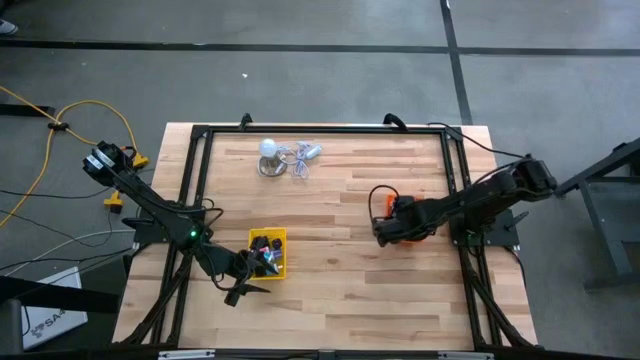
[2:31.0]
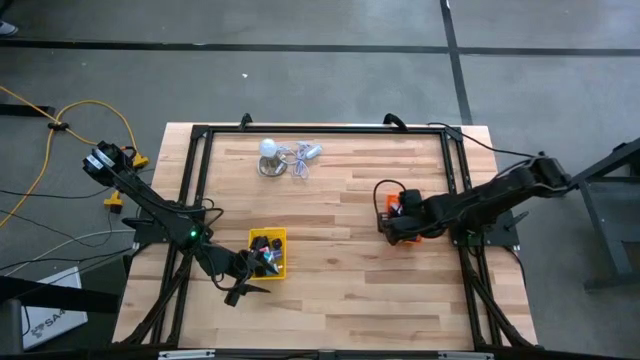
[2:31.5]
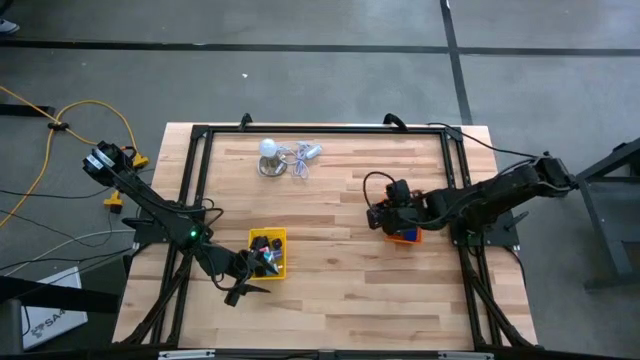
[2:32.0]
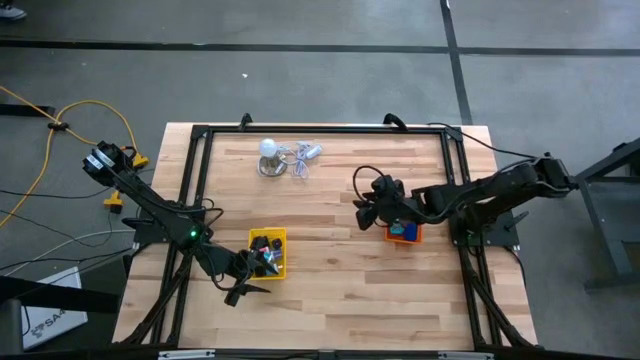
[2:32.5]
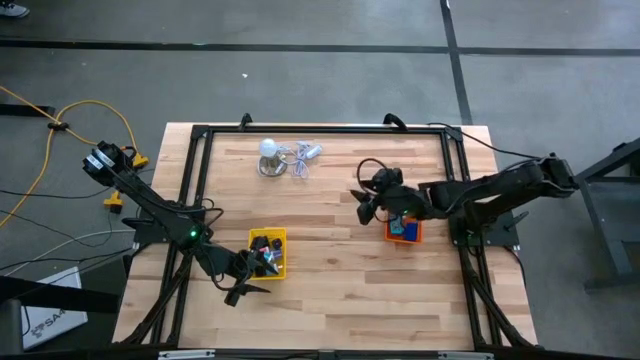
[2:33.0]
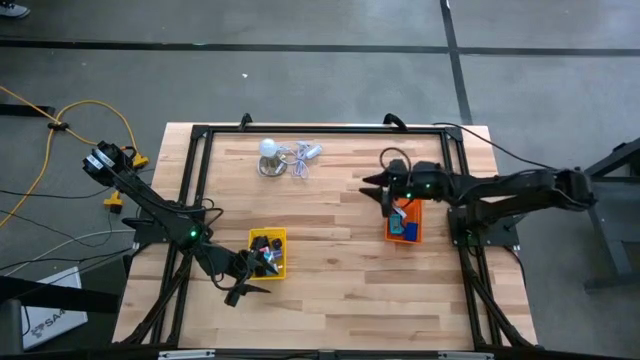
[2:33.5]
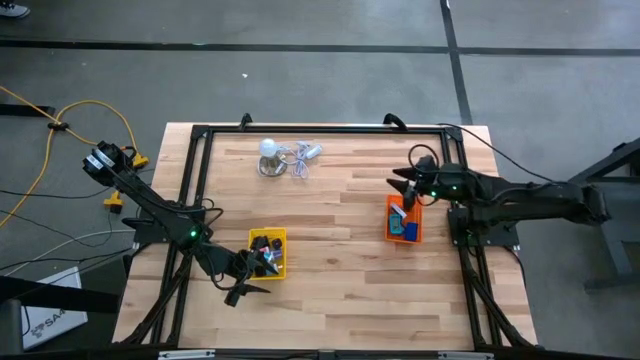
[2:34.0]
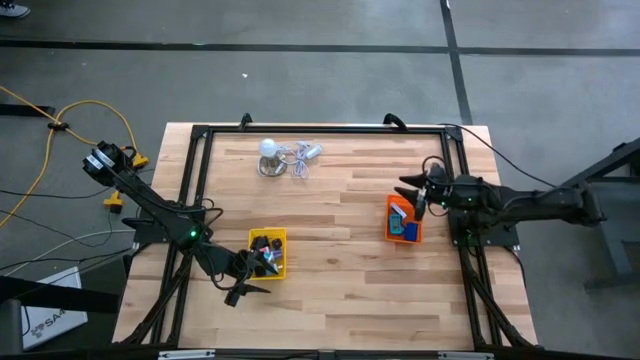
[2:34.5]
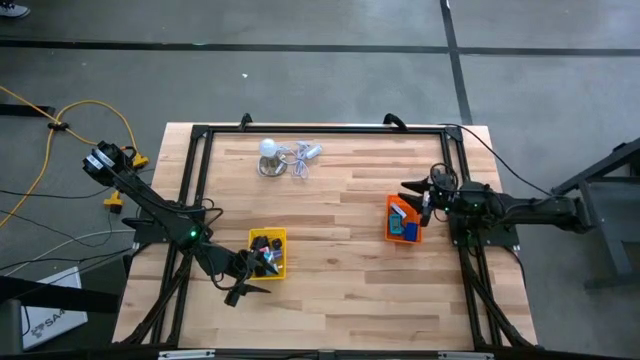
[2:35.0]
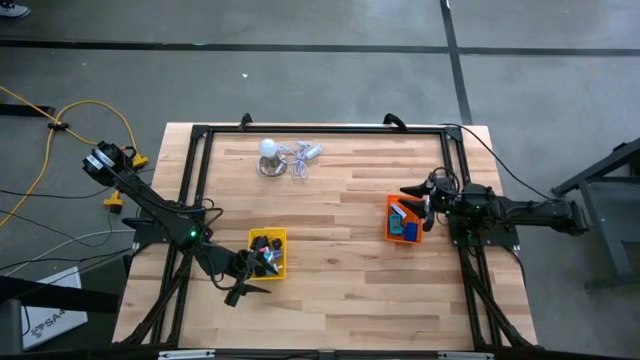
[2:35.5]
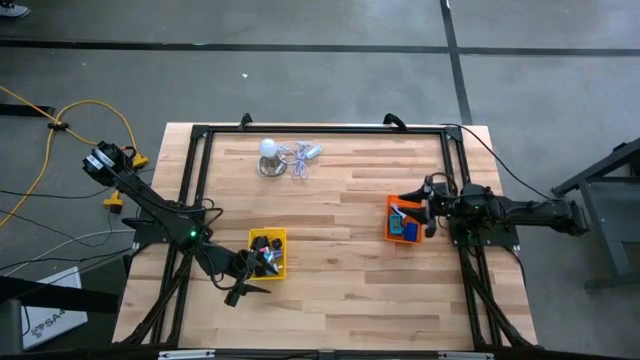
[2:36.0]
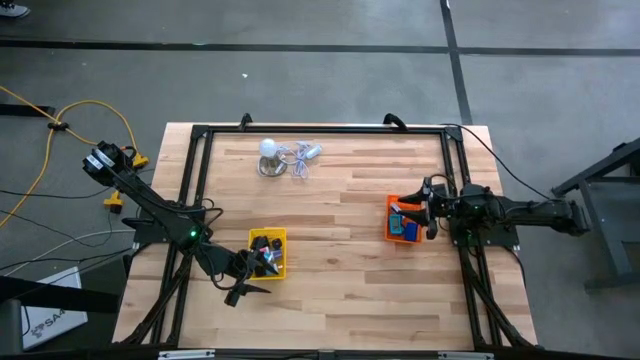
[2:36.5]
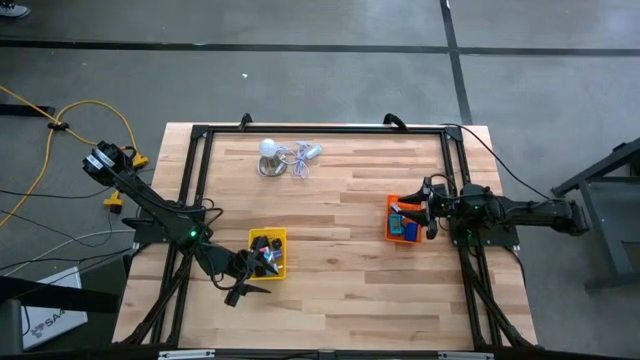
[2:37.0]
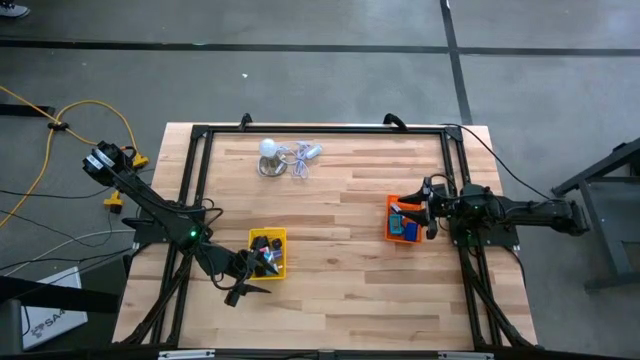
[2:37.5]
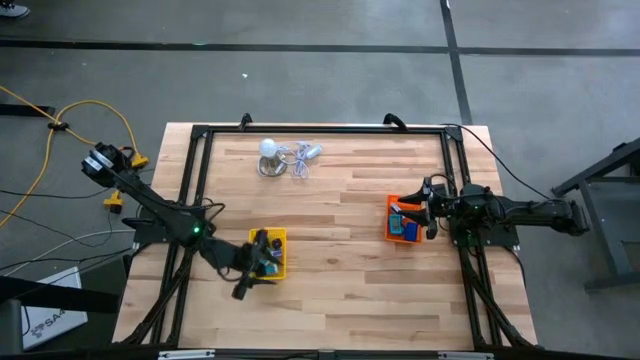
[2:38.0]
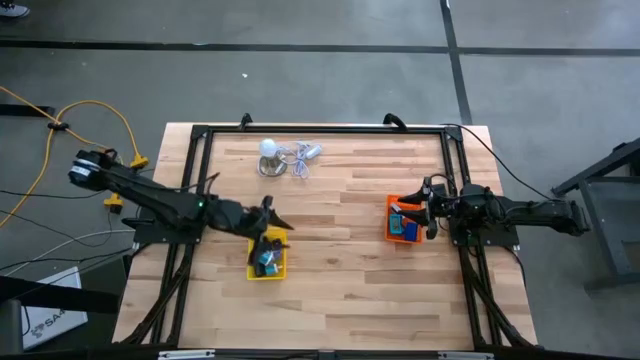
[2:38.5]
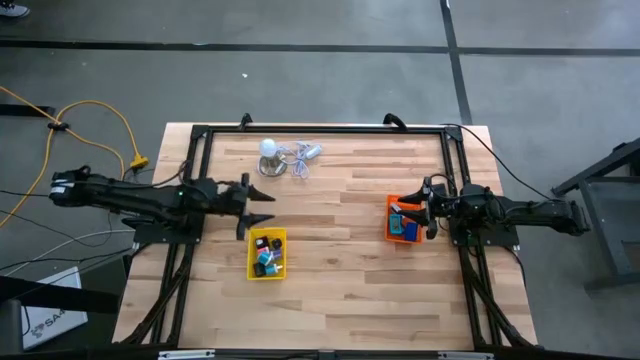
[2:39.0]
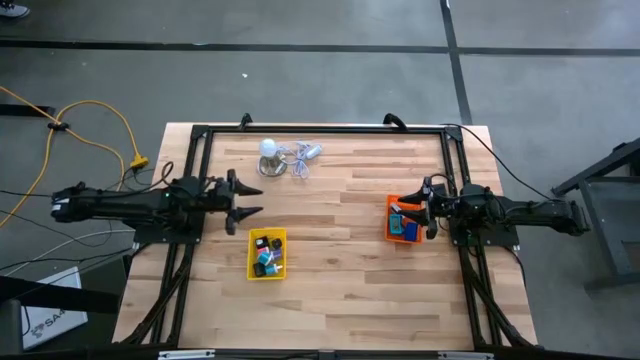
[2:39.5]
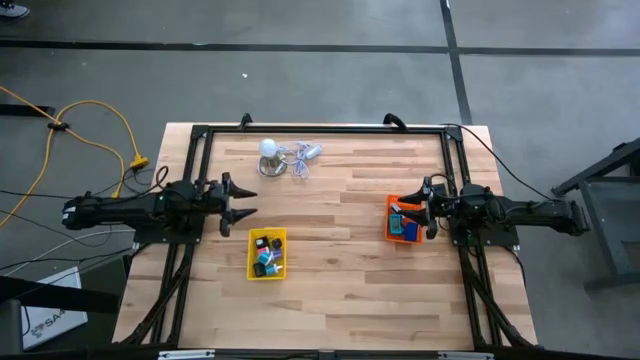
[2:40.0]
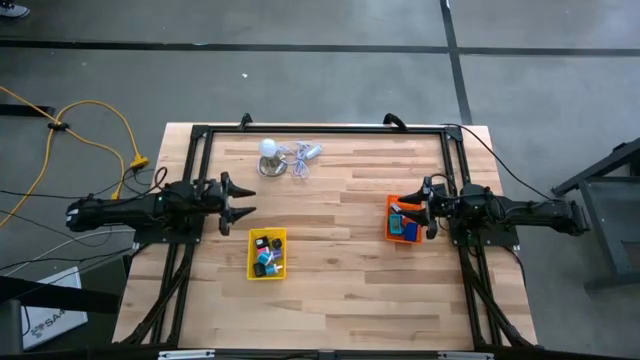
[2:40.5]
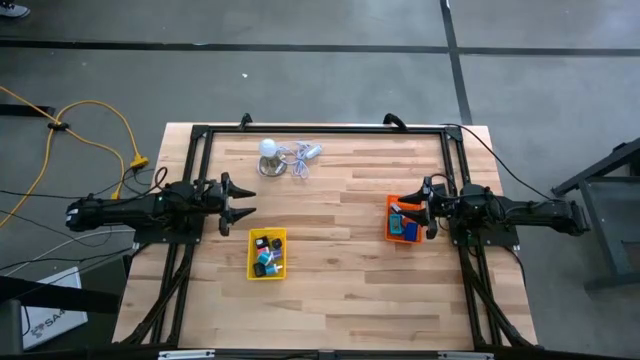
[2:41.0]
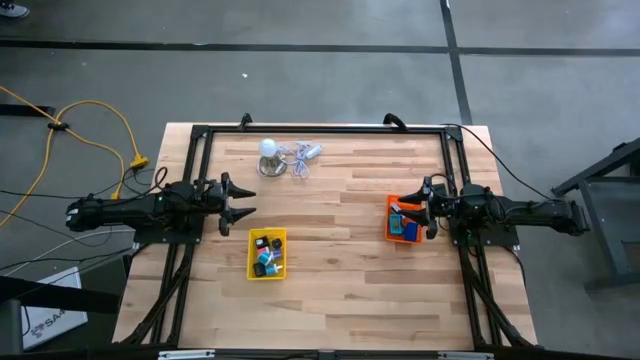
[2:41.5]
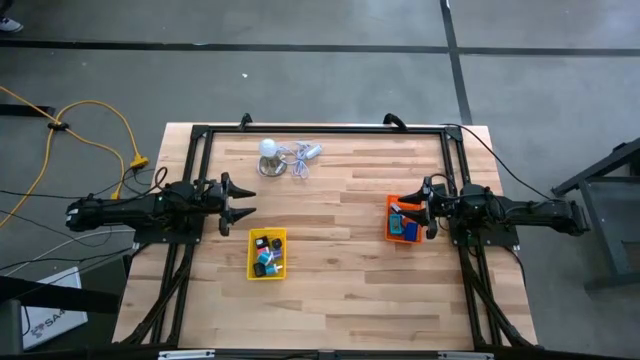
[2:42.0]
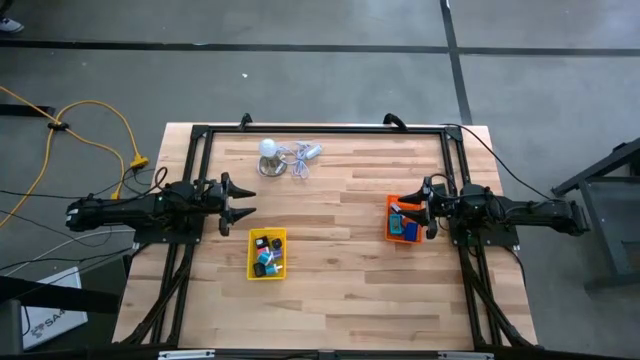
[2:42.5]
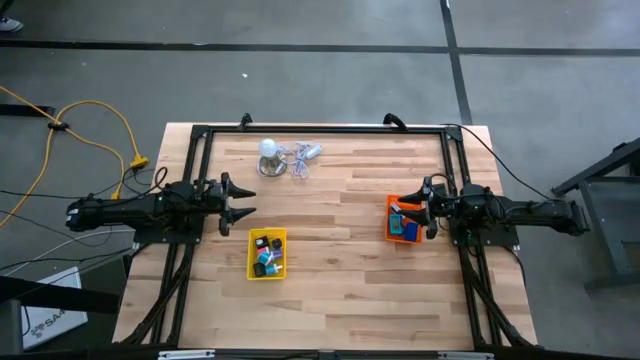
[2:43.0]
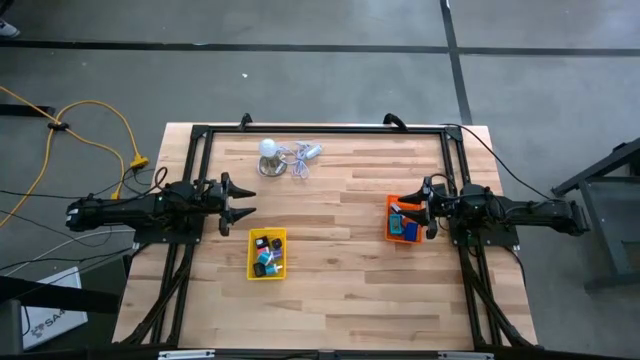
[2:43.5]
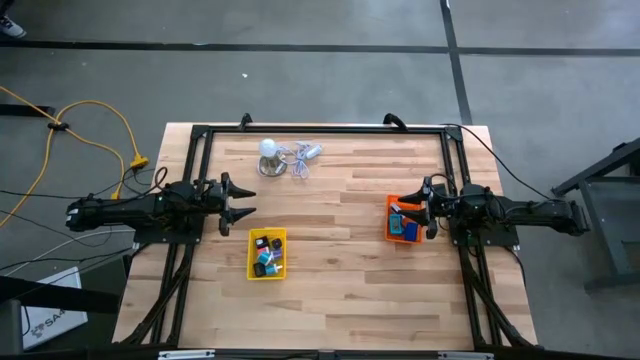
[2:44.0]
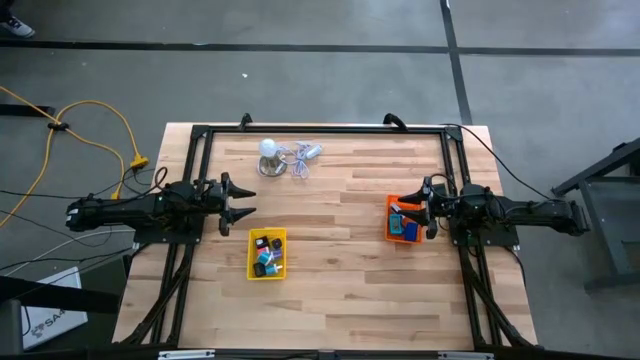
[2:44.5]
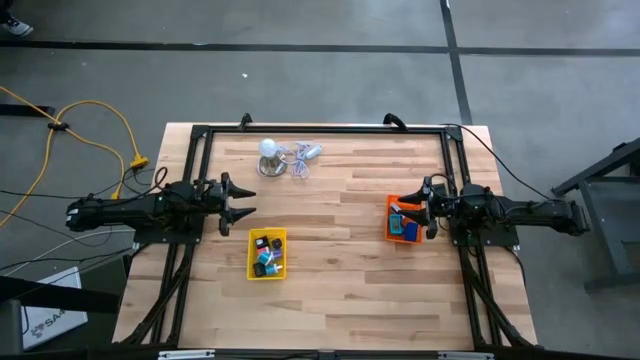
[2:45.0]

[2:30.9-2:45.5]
Task: Pick & Place Office items
Return to Home Position

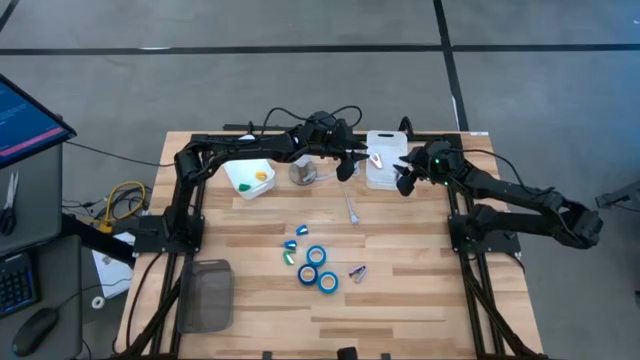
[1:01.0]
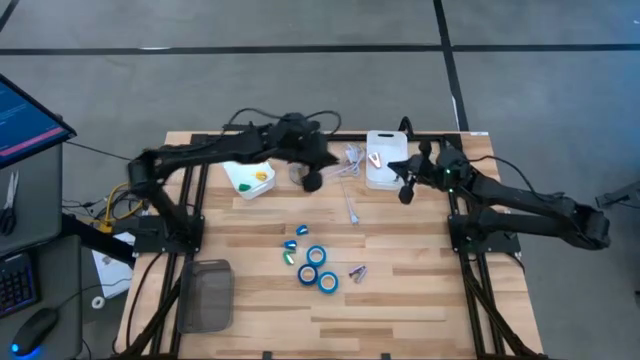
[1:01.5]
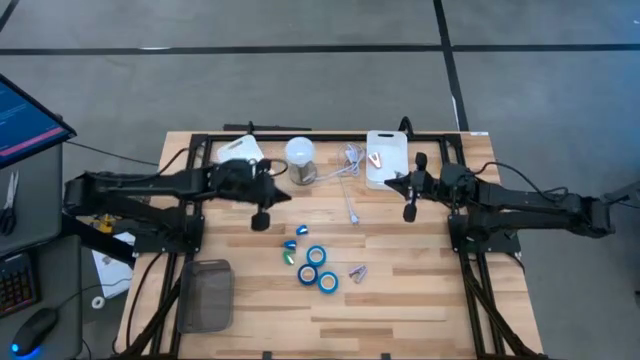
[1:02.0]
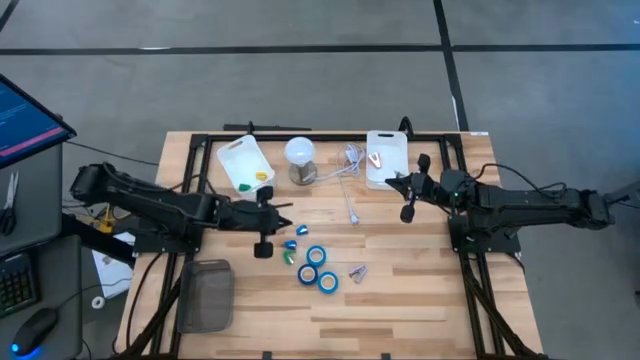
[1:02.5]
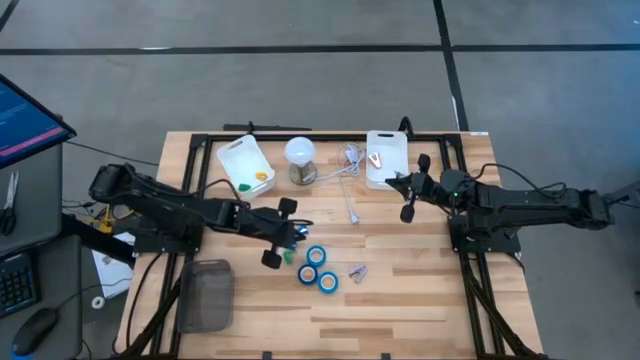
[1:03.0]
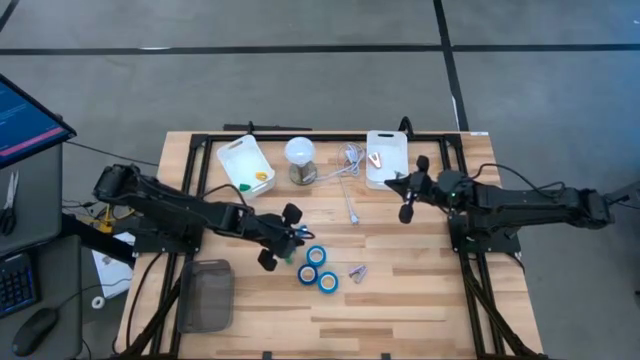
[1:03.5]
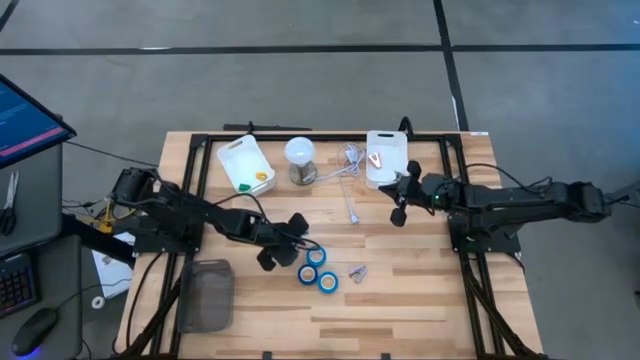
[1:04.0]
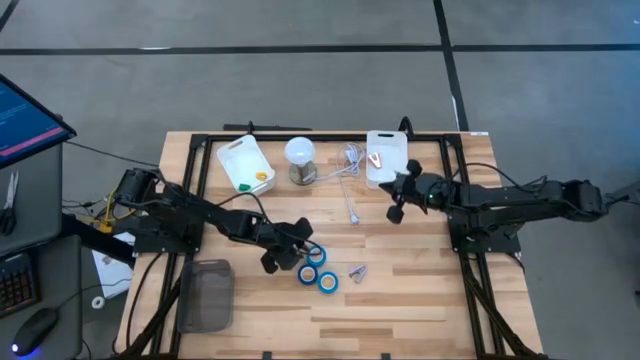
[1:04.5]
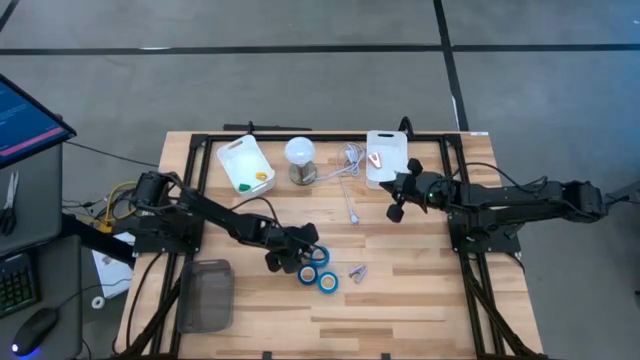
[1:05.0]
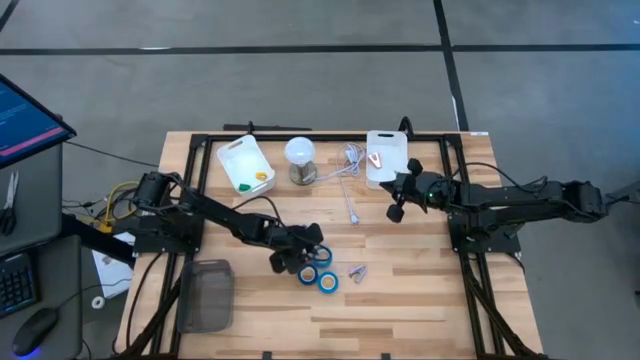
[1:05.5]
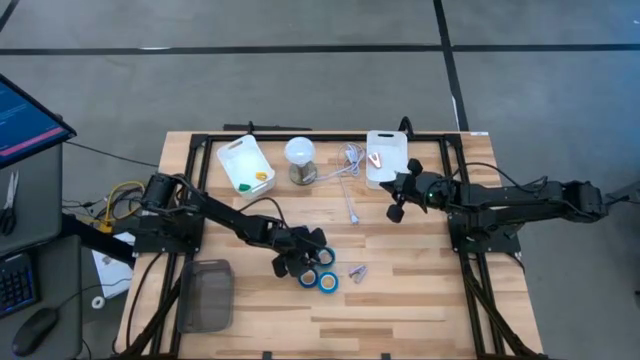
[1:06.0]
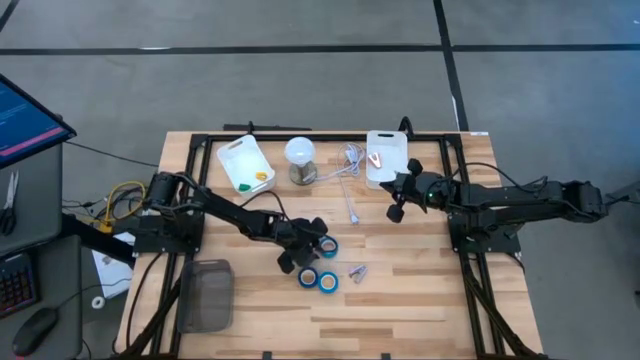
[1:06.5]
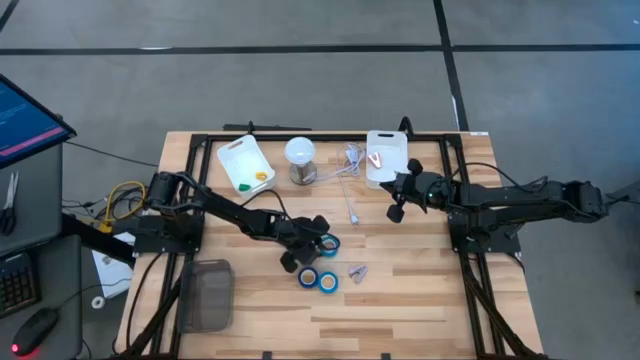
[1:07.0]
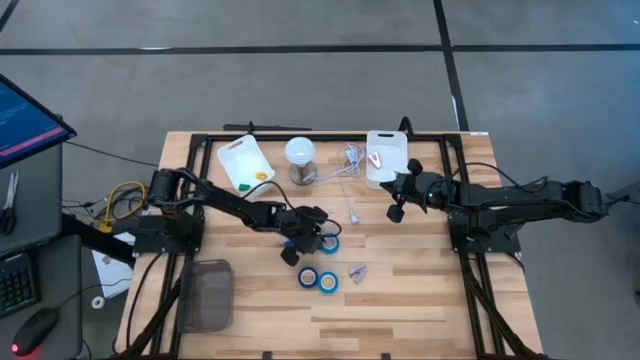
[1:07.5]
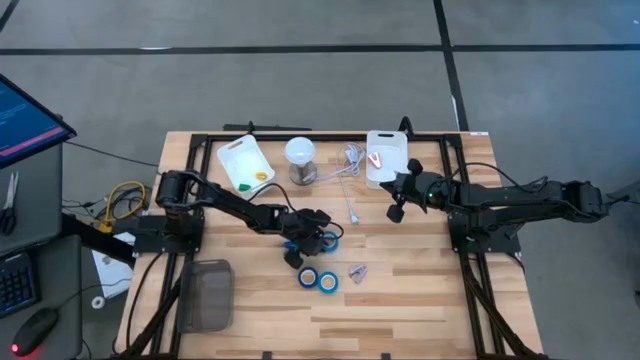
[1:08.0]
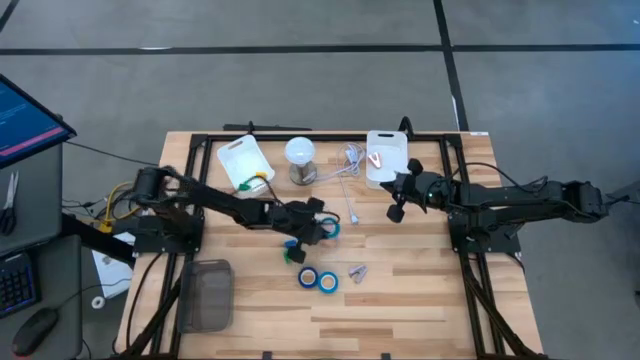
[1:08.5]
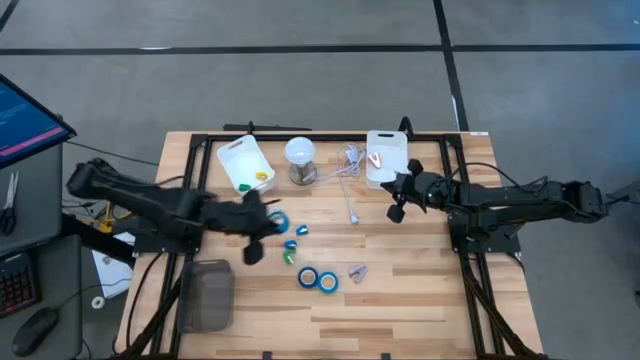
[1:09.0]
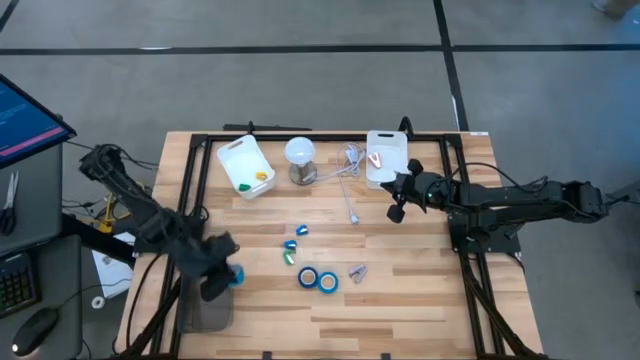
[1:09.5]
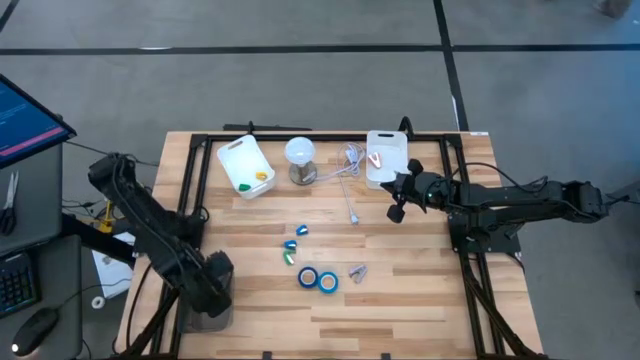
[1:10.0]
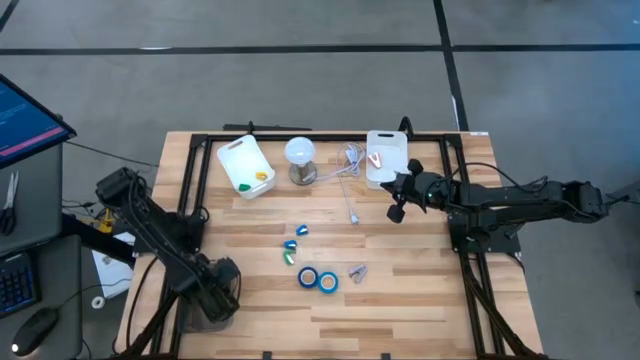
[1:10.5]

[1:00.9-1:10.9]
Task: Pick and place Stapler, Stapler remover, tape
Put the top light blue tape into the black bin
